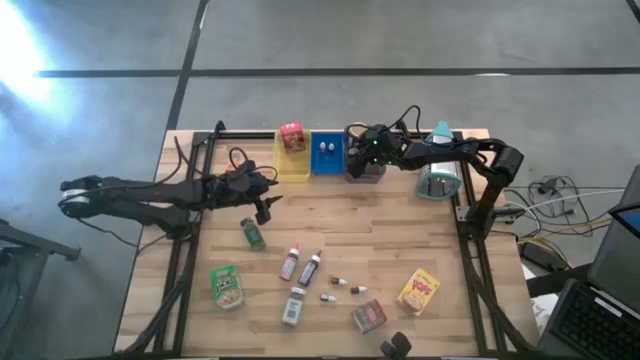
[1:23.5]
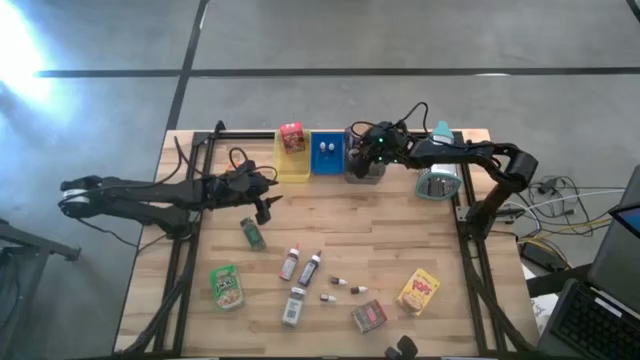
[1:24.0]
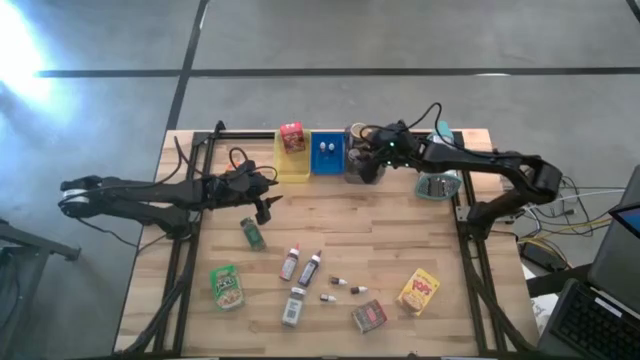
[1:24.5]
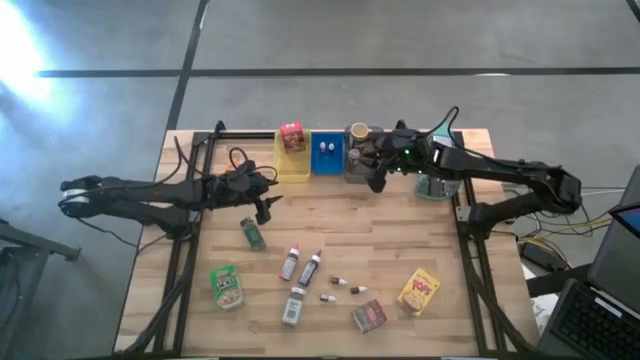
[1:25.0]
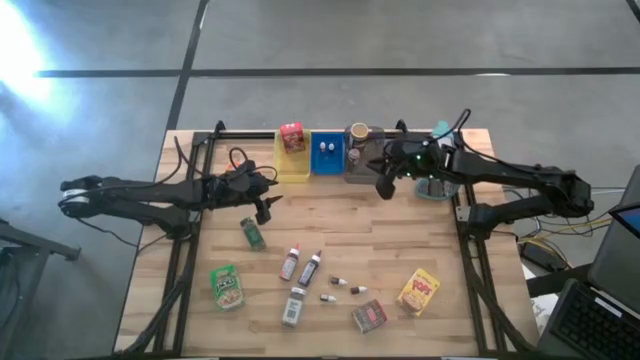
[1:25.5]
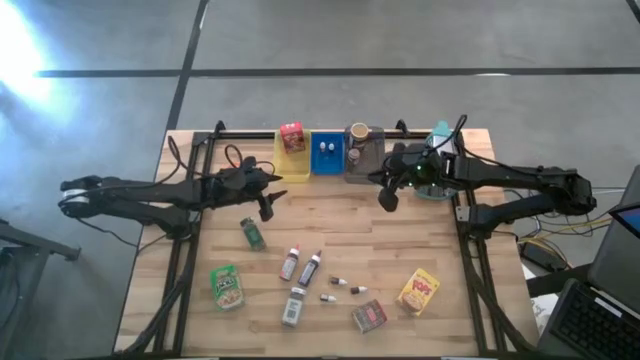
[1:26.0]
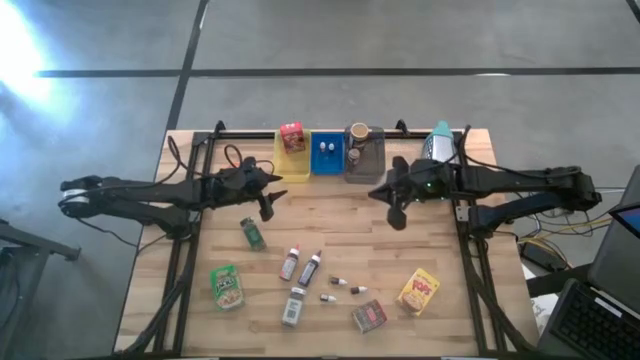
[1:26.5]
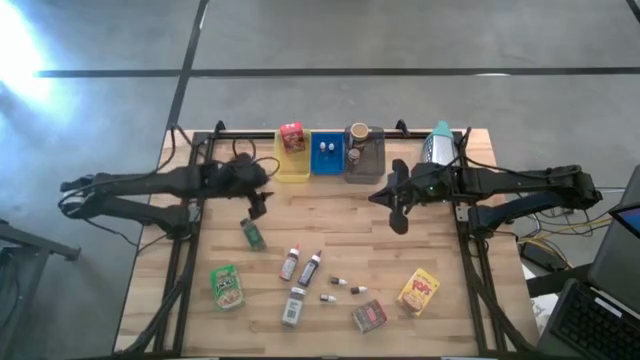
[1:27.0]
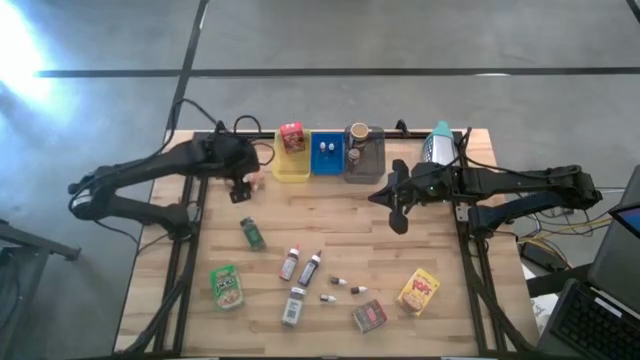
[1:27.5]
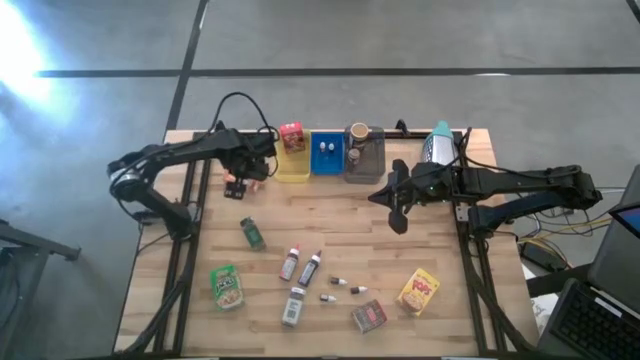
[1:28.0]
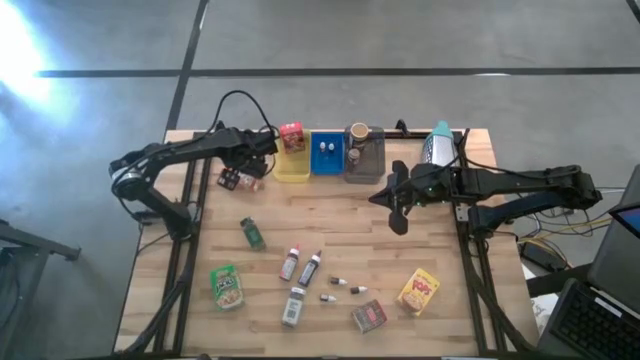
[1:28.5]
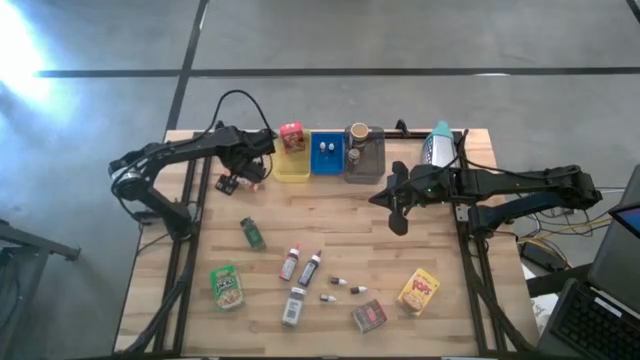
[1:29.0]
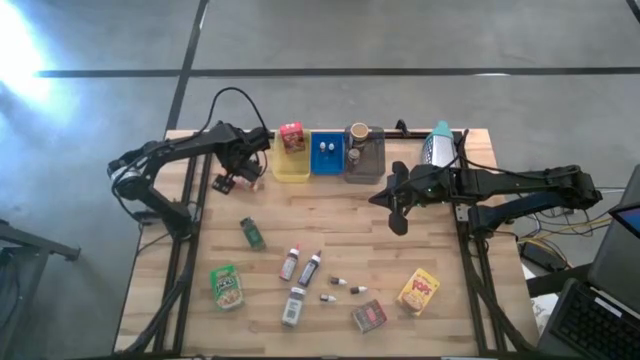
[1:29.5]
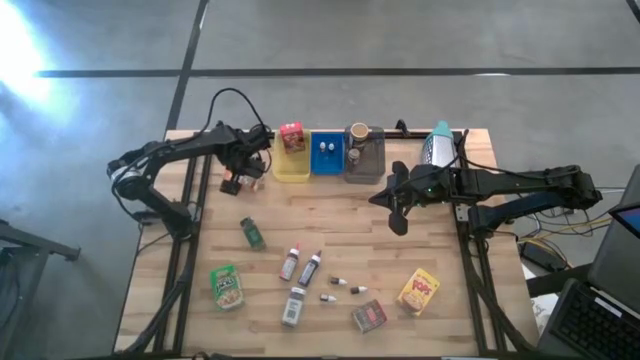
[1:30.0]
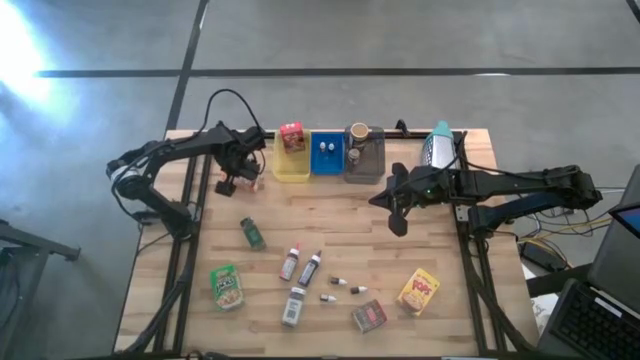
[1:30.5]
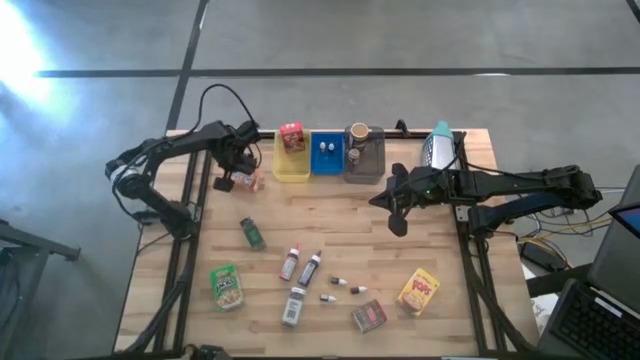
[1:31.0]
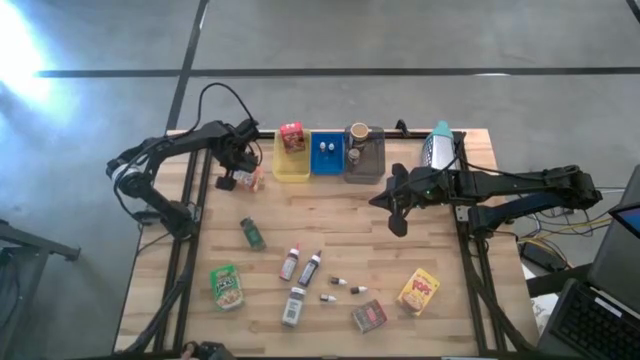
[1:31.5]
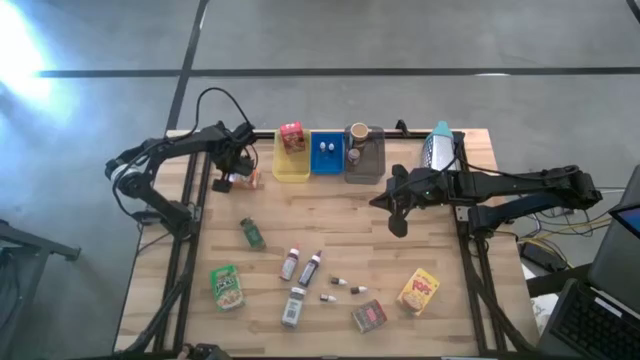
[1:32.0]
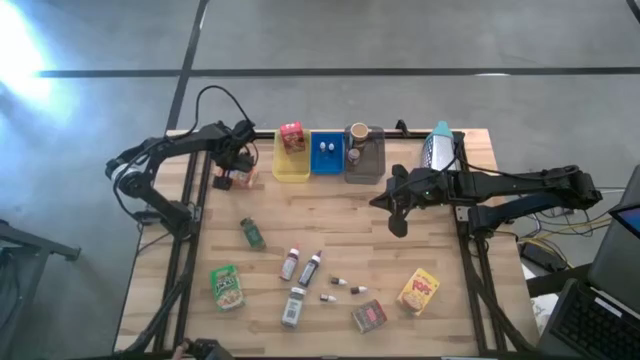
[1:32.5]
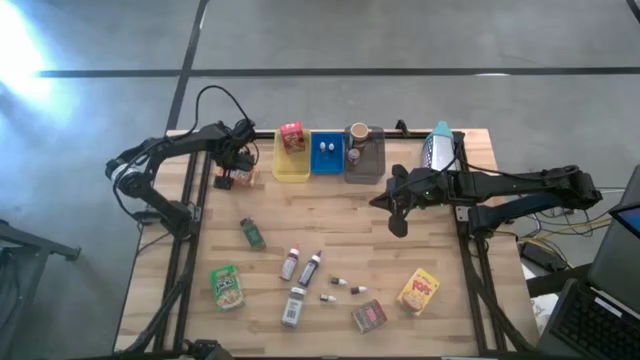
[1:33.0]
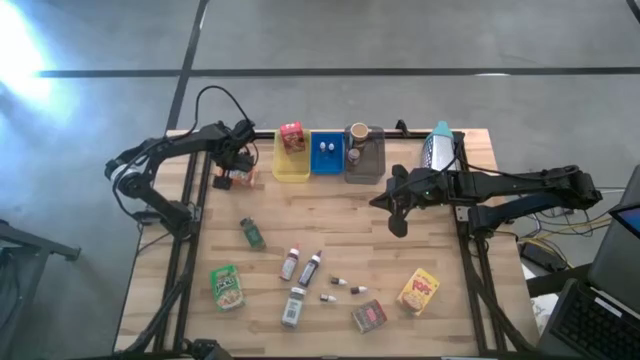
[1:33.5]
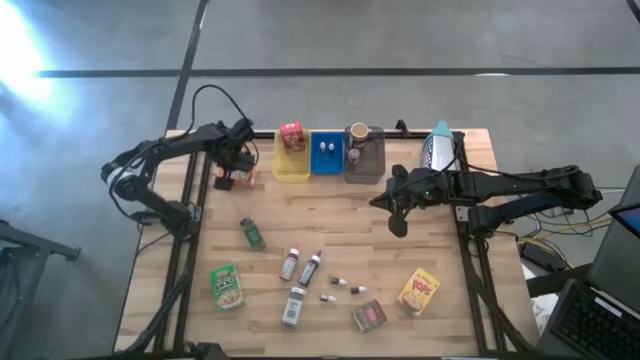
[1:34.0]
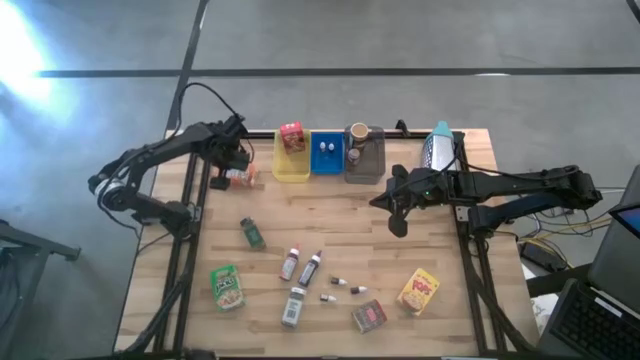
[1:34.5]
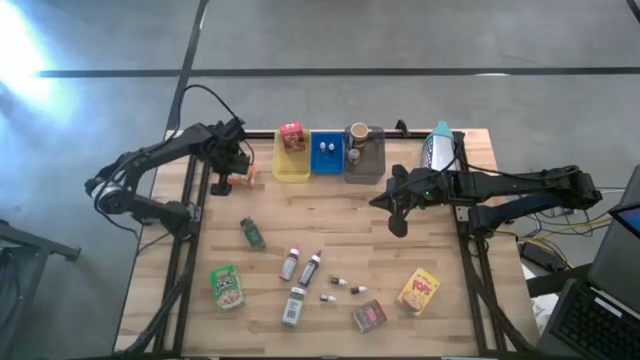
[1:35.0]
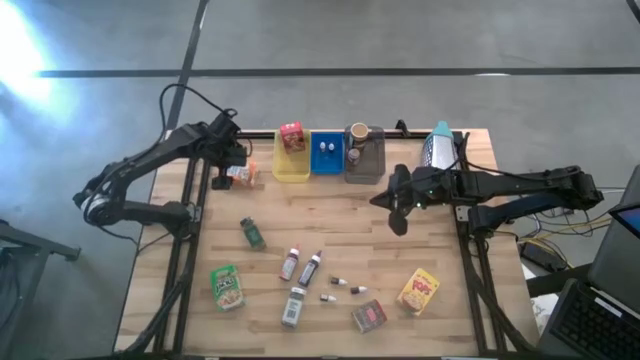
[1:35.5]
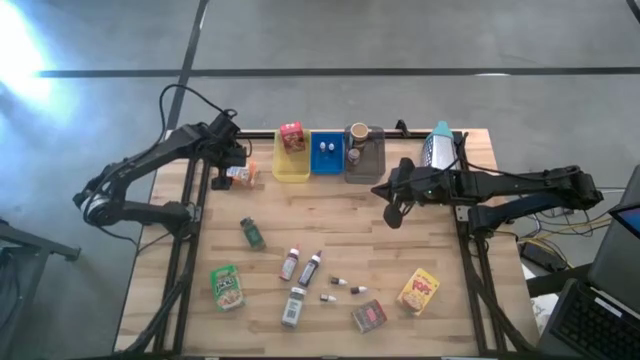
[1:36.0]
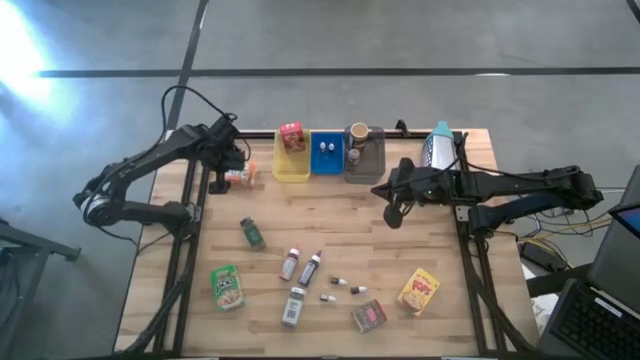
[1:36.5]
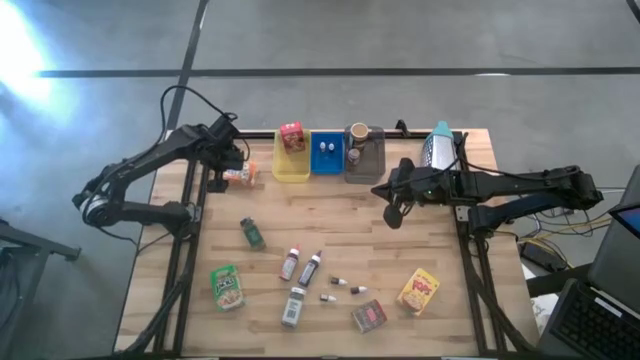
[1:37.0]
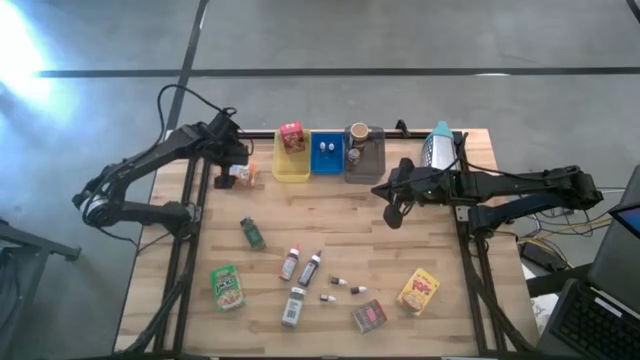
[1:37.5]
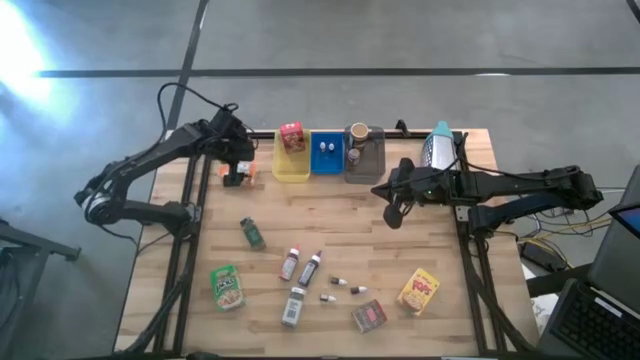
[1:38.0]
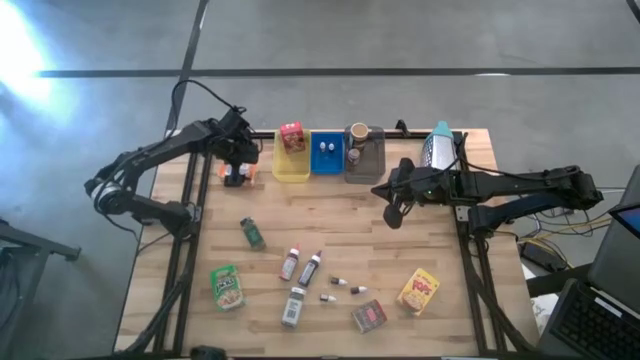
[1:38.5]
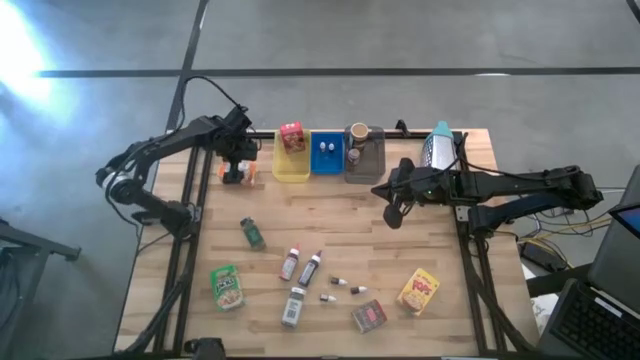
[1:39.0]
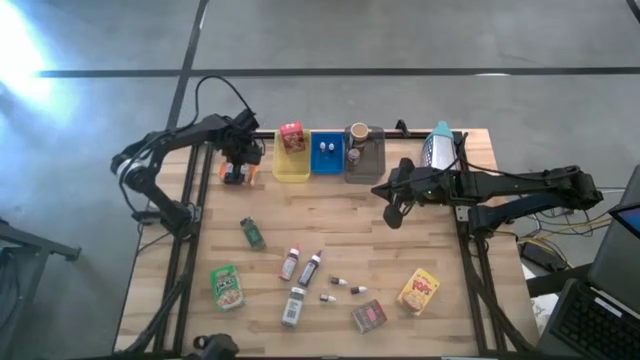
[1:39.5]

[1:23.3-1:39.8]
Task: Pick & Place Kitchen Items
Put the orange cereal box into the yellow bin

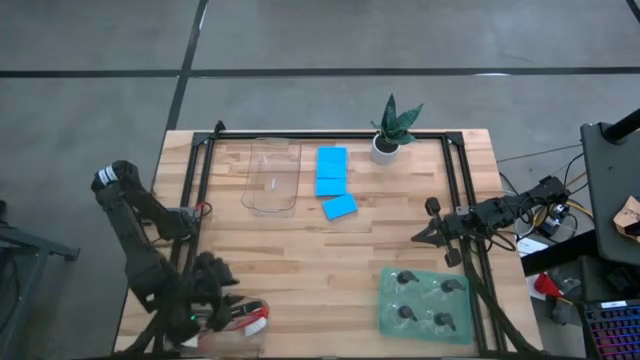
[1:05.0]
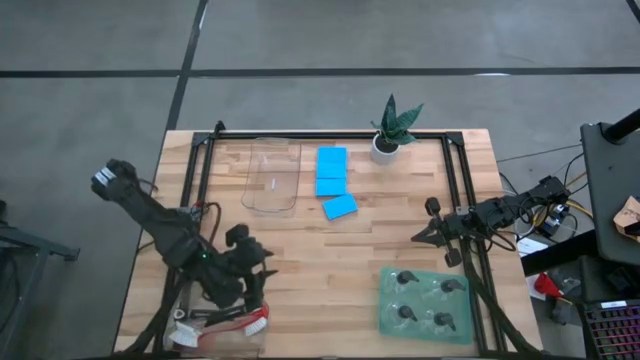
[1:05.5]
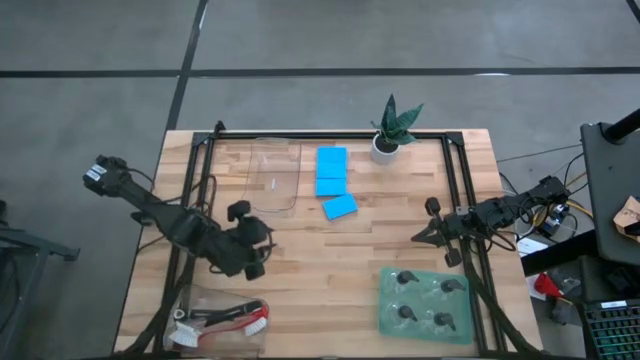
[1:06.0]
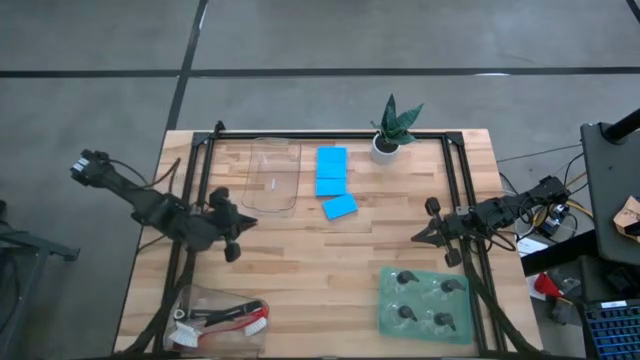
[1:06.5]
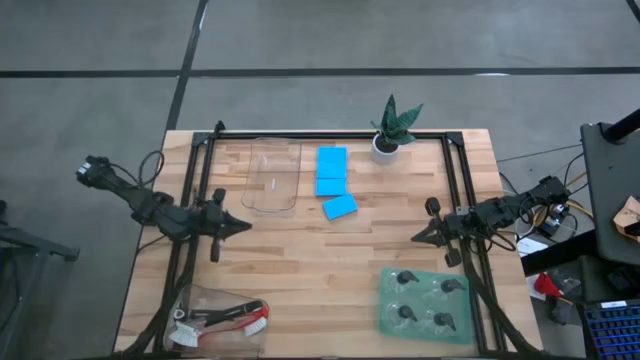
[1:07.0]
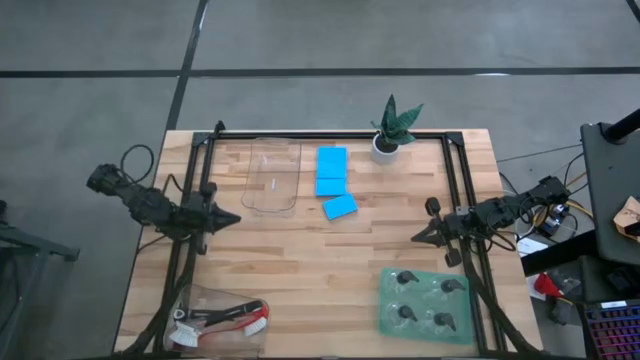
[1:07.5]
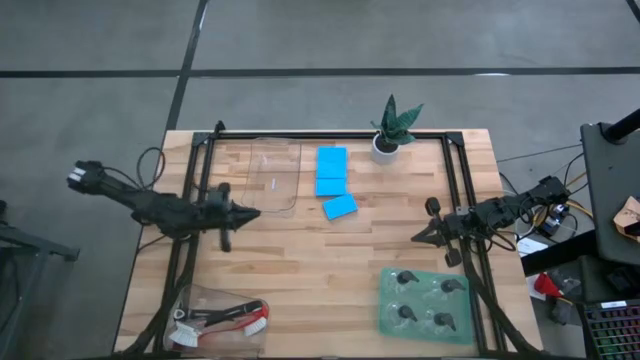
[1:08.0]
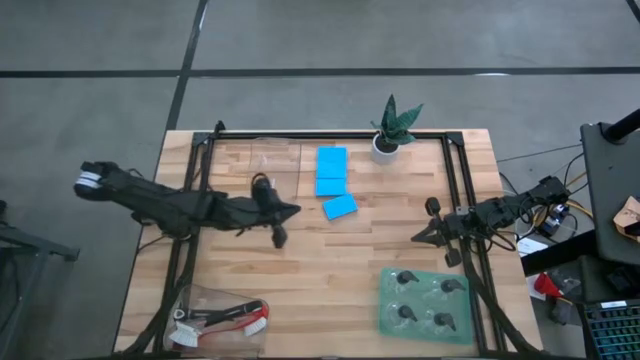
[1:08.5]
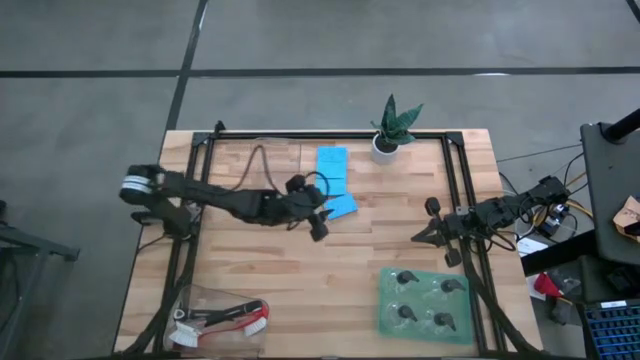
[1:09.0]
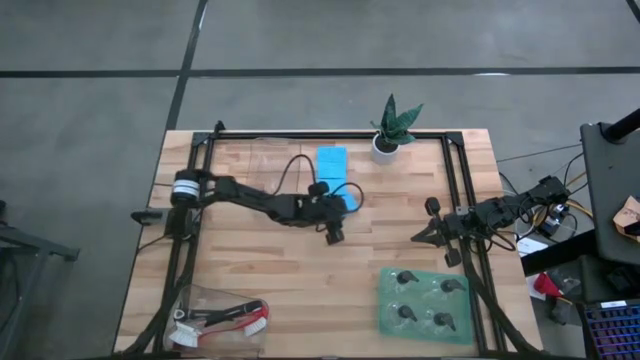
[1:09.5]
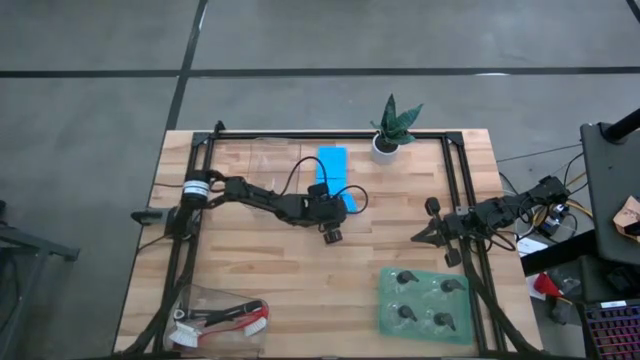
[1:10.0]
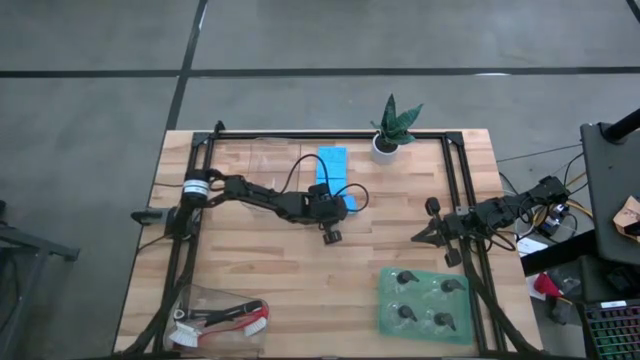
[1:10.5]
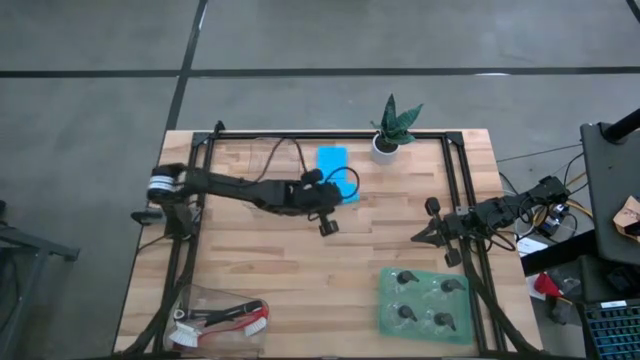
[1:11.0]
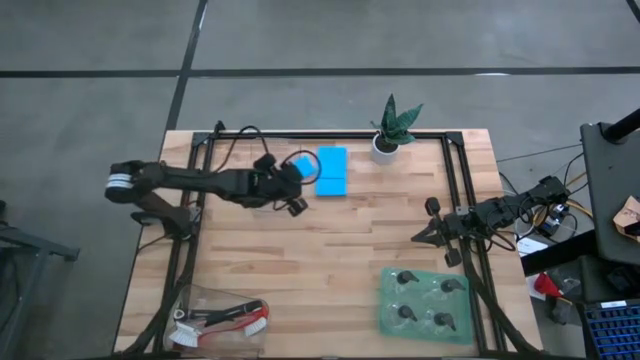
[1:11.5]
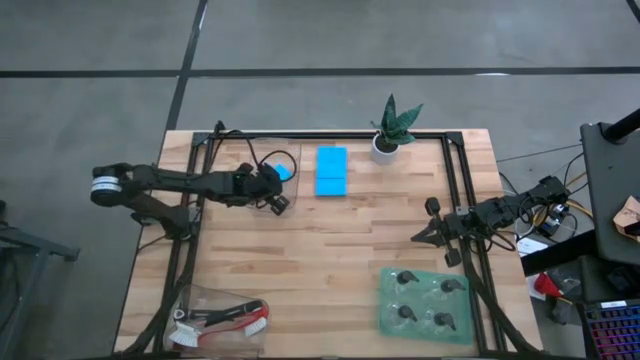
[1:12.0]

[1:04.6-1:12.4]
Task: Pick & Place Kitchen Sink Supplies
Put the sponge into the top transparent bin
